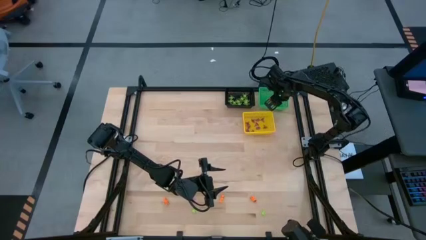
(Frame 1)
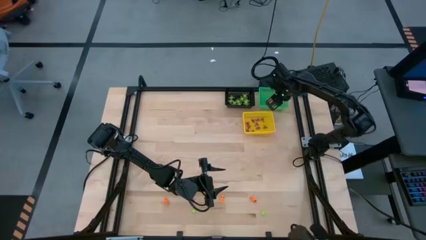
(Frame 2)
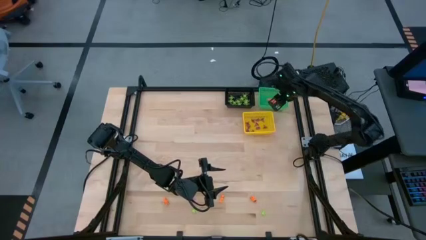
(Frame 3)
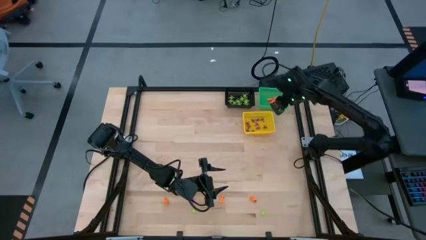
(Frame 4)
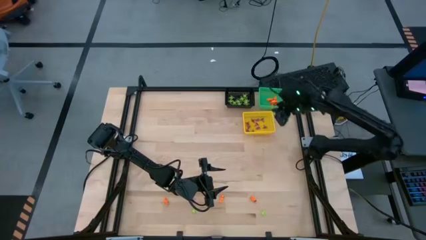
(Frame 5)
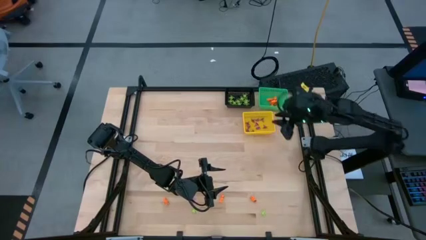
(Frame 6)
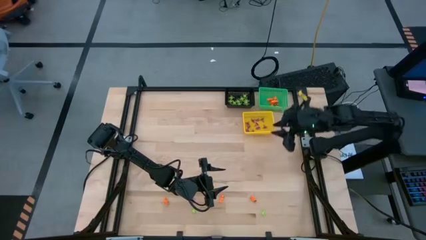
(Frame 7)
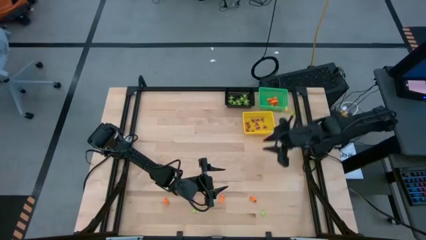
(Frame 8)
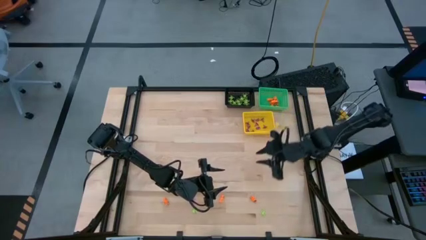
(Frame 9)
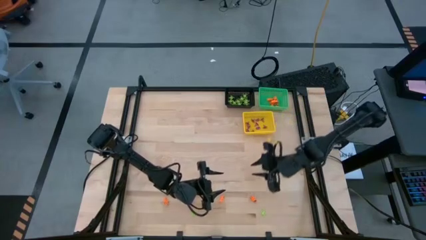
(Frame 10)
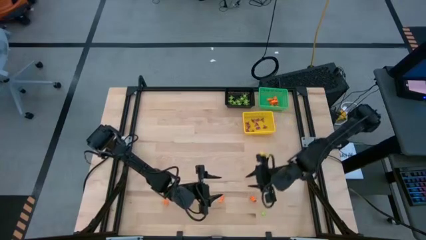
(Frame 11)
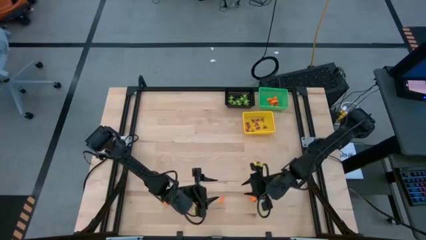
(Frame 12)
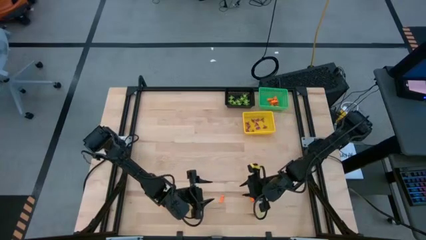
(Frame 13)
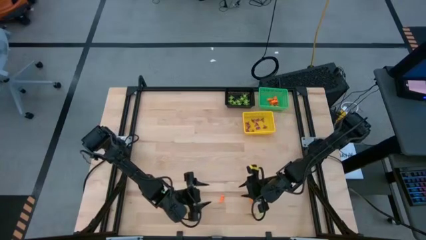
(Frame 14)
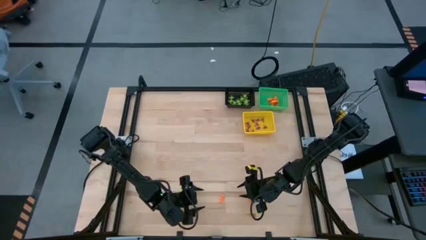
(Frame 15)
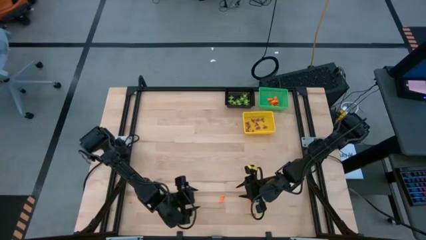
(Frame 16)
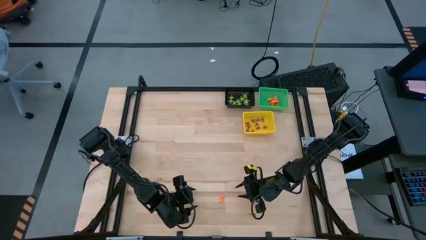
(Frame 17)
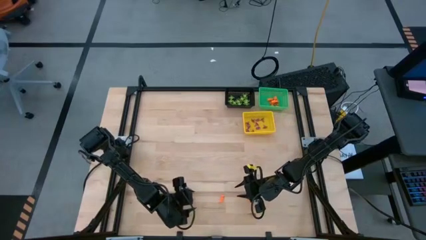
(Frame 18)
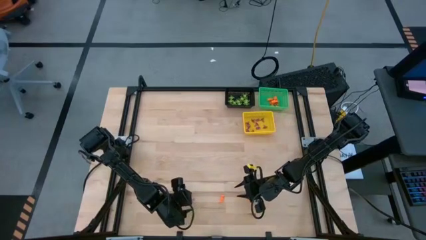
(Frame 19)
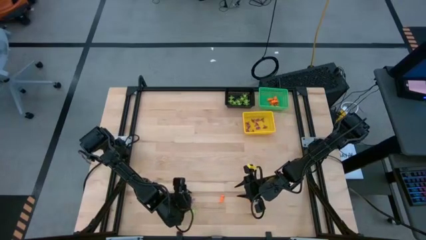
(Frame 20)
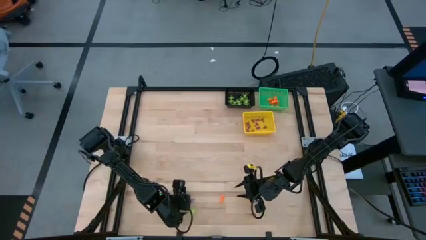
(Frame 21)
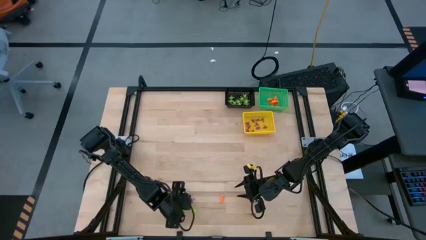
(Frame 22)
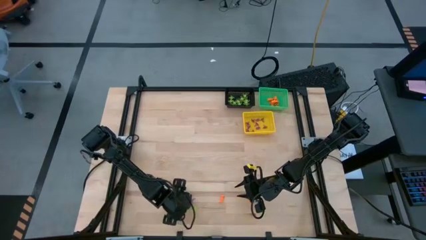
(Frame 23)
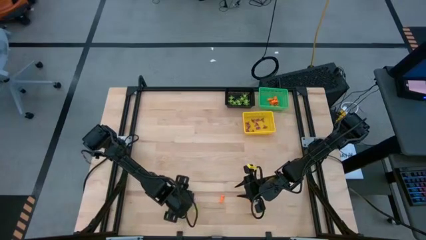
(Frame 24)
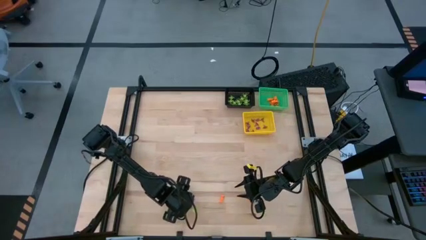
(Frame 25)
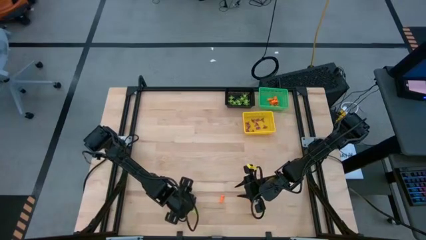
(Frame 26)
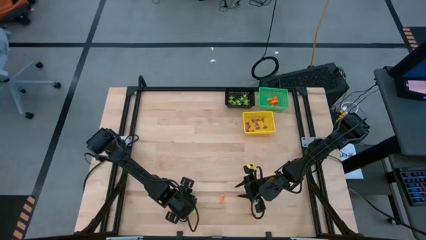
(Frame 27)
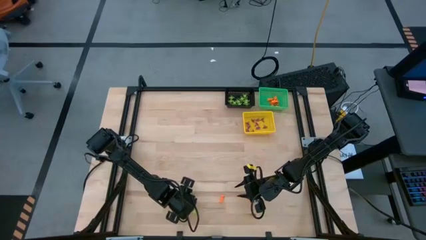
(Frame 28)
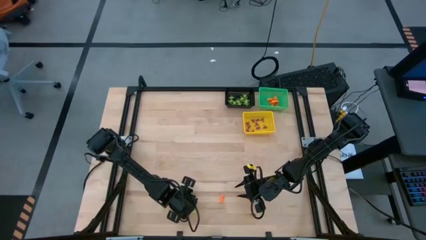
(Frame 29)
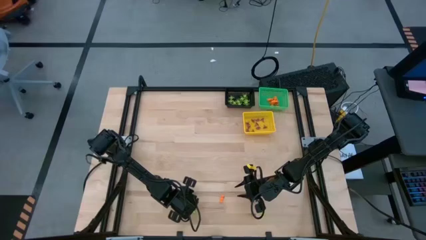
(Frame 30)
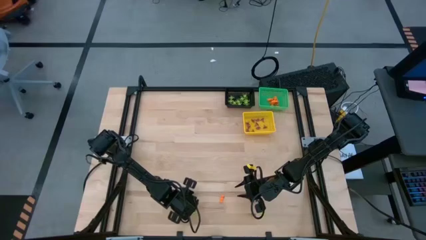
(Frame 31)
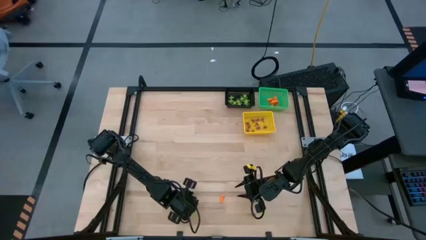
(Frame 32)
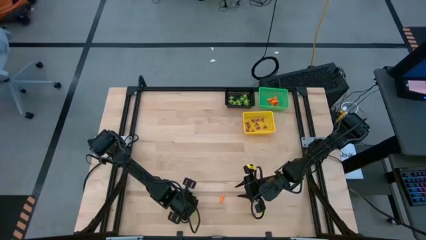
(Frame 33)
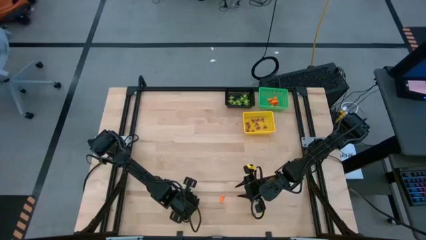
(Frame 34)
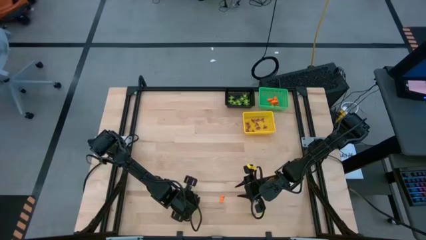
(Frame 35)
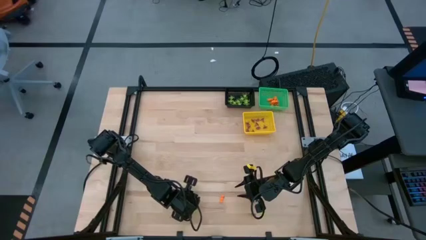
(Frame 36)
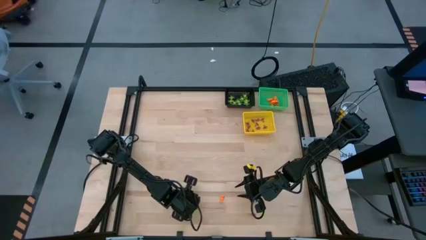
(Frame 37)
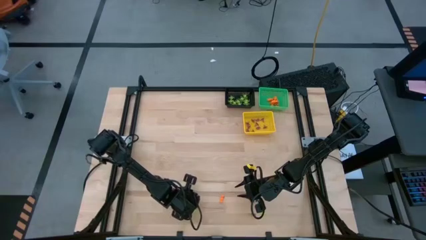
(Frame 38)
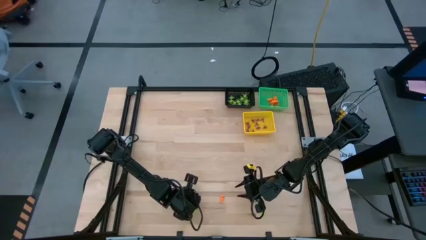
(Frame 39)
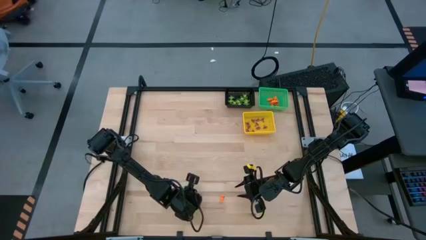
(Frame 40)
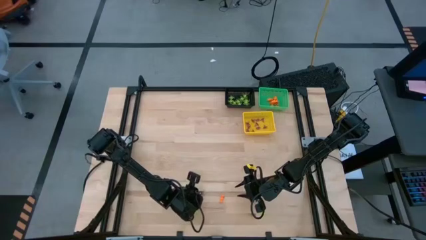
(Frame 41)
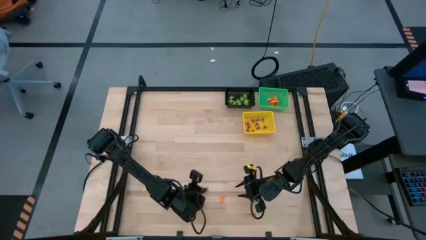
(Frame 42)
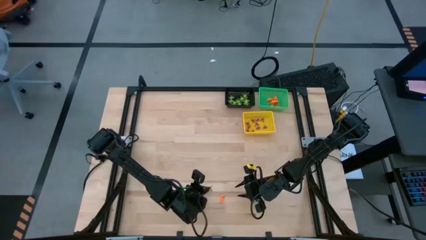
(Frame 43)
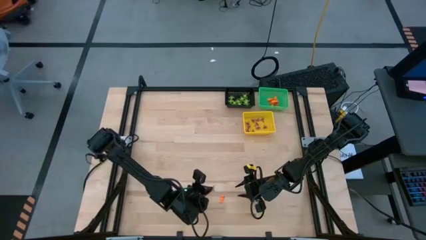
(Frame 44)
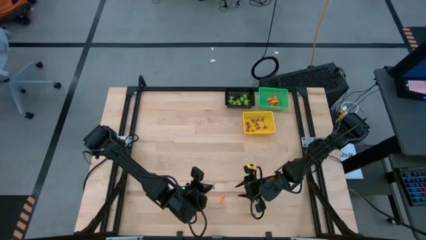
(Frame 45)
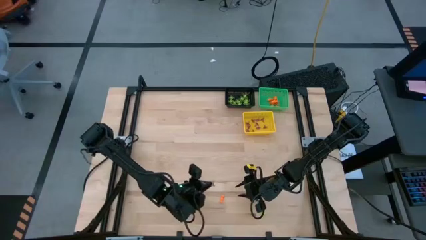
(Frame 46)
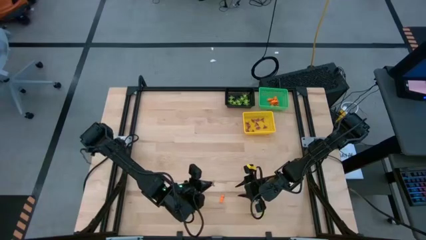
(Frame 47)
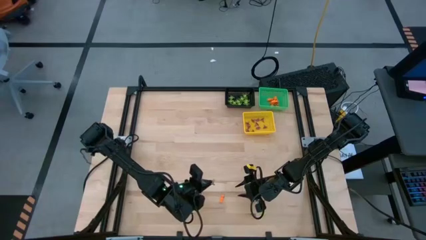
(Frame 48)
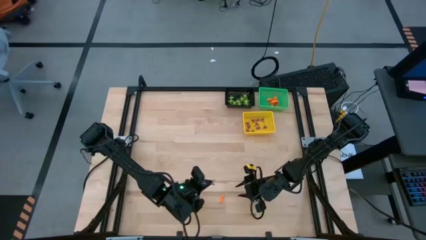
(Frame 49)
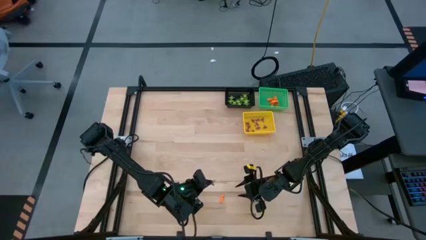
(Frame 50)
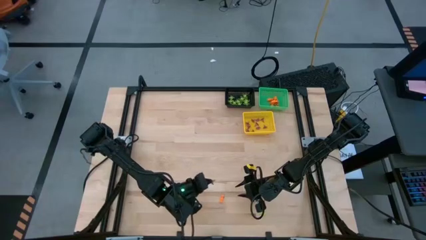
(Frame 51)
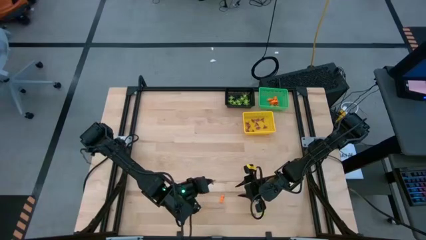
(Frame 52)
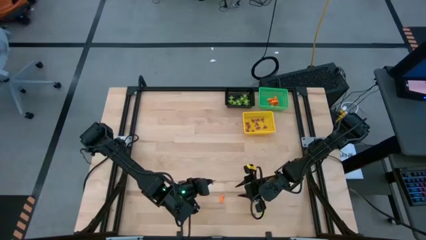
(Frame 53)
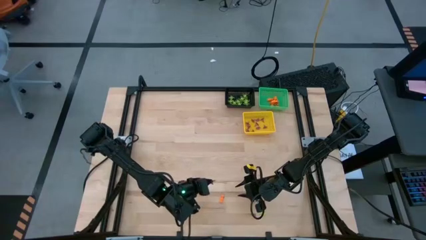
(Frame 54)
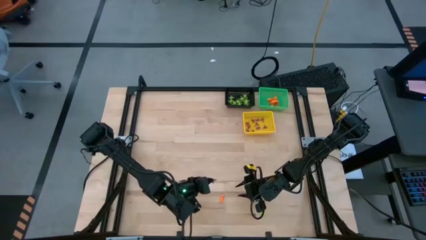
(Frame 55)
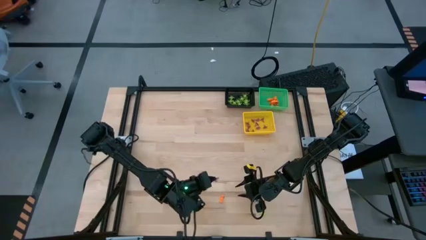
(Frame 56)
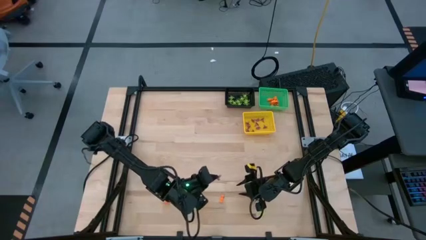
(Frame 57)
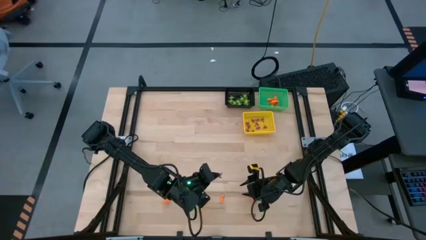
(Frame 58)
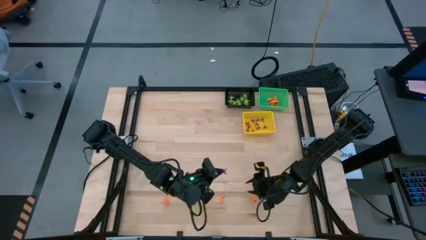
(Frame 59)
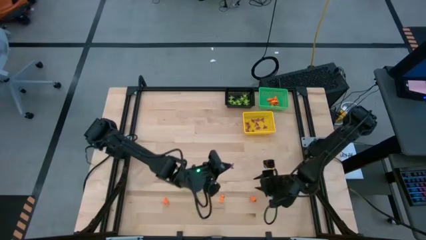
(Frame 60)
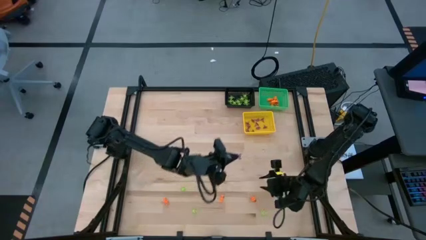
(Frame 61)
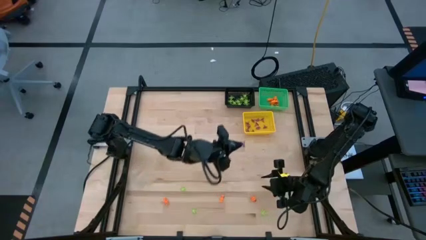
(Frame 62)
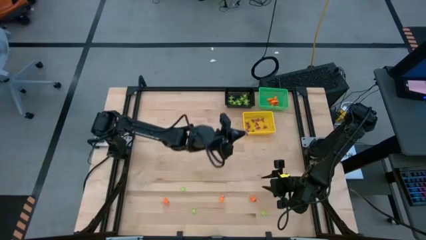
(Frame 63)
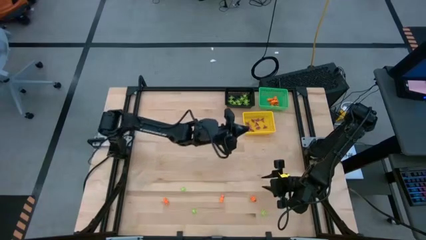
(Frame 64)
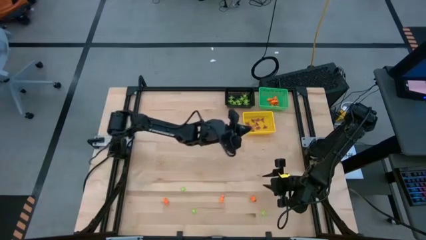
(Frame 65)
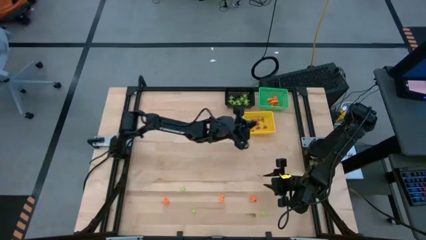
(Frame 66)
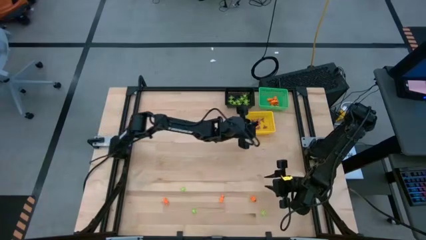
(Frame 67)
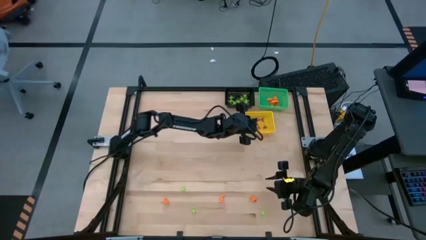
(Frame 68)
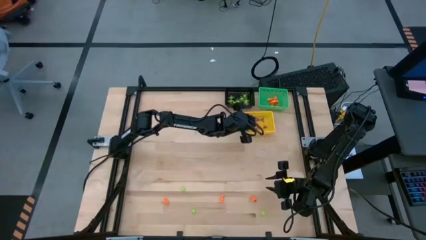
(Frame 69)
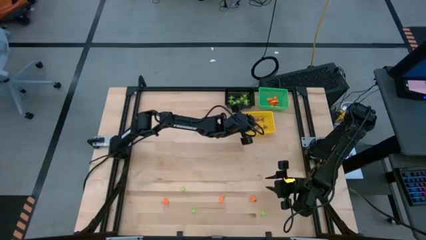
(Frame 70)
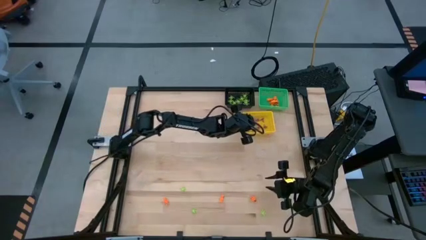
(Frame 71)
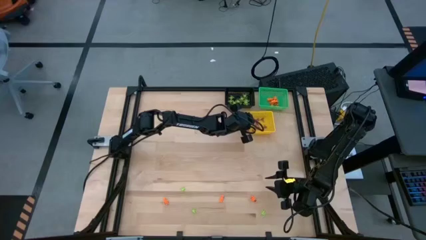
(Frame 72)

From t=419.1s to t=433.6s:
Task: Sort Halloween decoration
Put the violet witch hat toy into the yellow basket

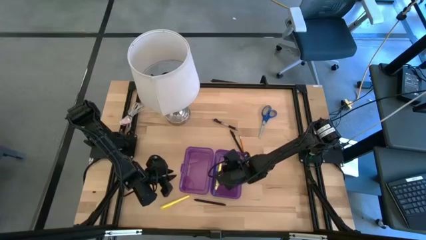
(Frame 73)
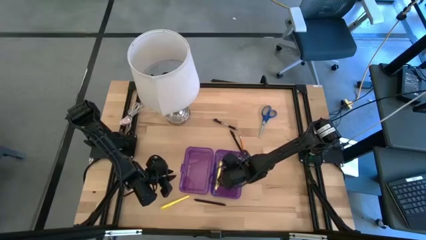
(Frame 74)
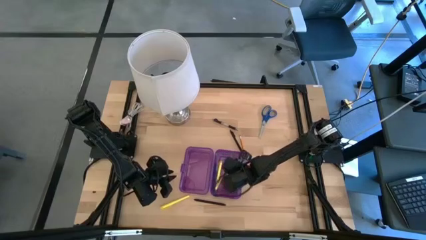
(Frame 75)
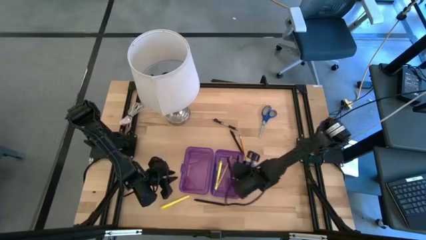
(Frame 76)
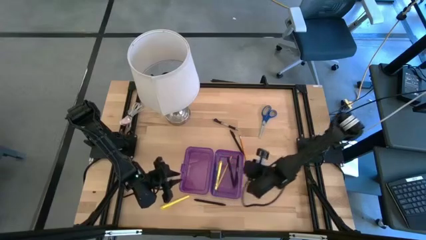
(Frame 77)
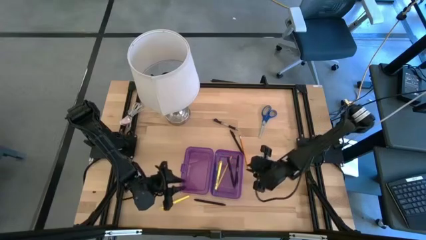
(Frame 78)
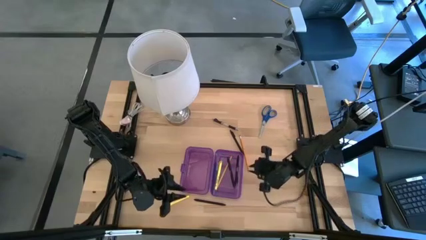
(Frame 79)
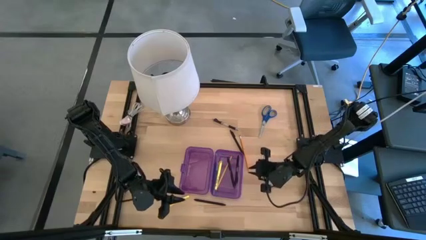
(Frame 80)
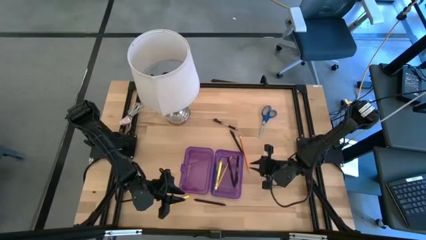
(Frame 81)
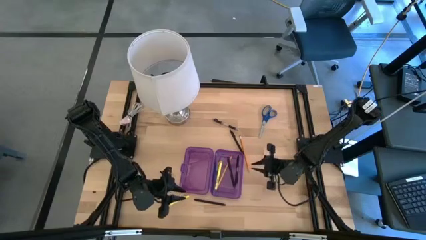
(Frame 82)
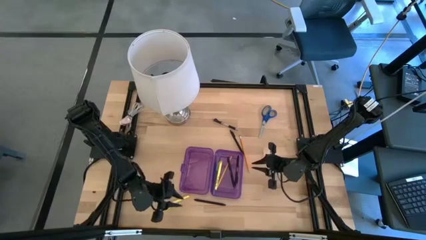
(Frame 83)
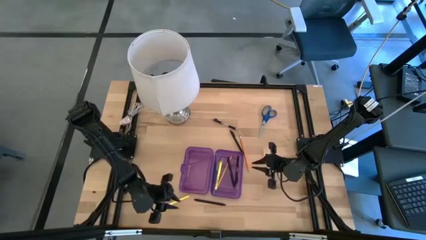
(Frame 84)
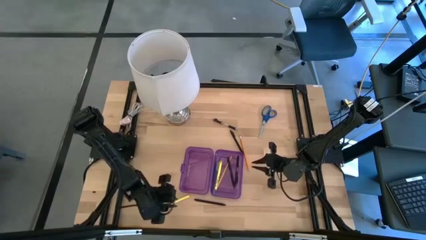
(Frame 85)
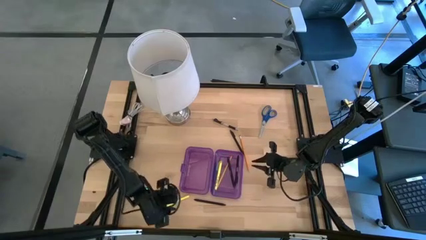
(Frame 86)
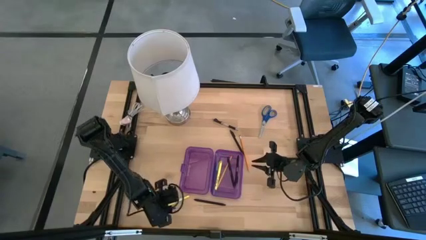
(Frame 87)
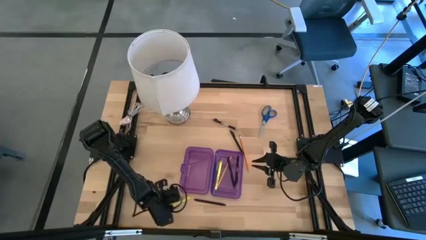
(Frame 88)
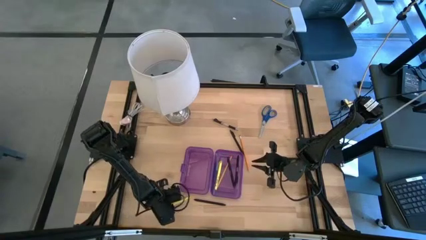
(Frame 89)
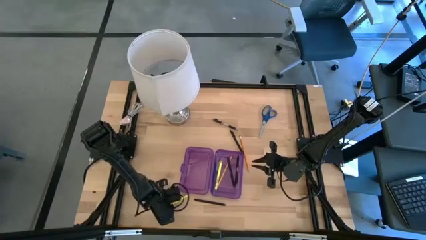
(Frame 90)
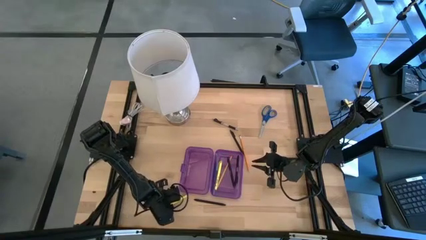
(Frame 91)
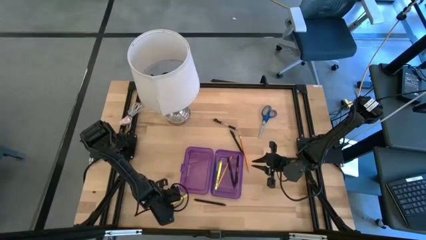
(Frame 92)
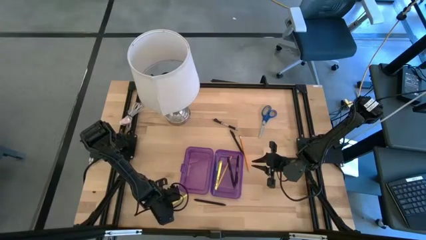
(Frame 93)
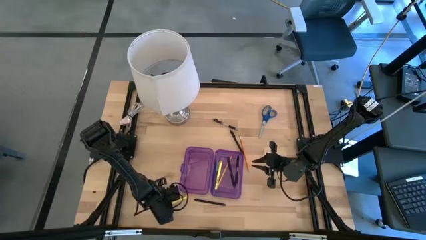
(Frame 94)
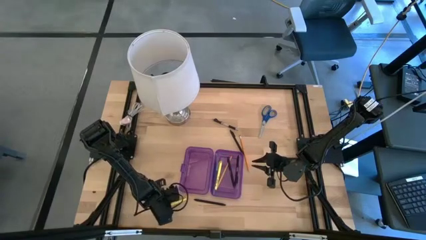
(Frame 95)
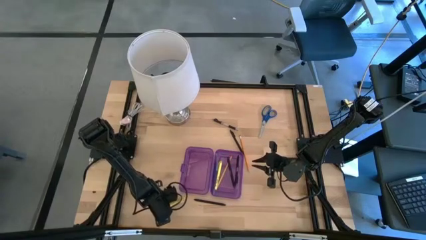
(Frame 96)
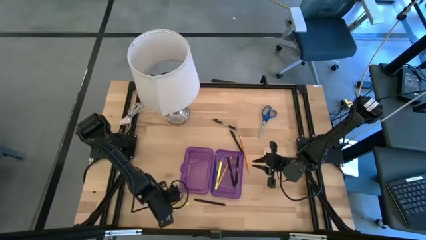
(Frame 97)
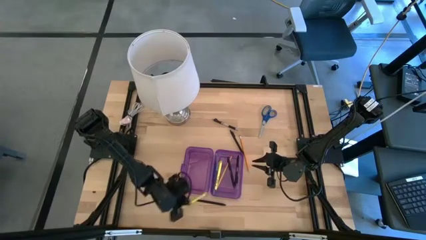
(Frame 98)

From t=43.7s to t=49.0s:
Task: Pick & place school supplies into a supply box
Put the yellow pencil into the purple supply box
